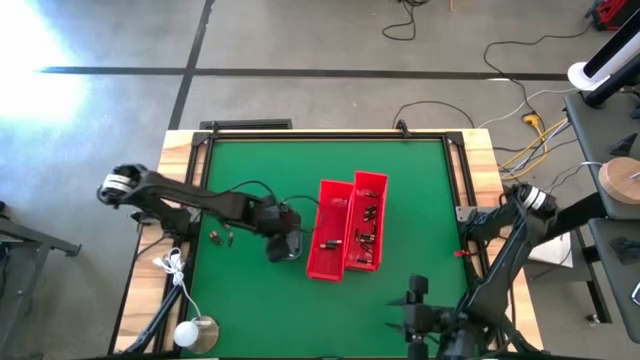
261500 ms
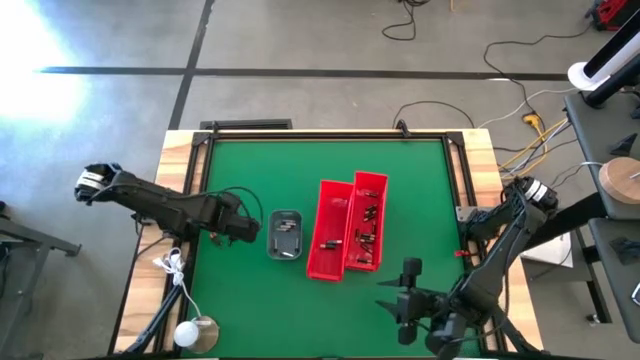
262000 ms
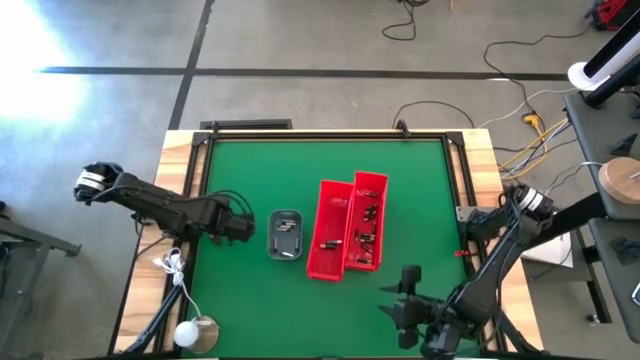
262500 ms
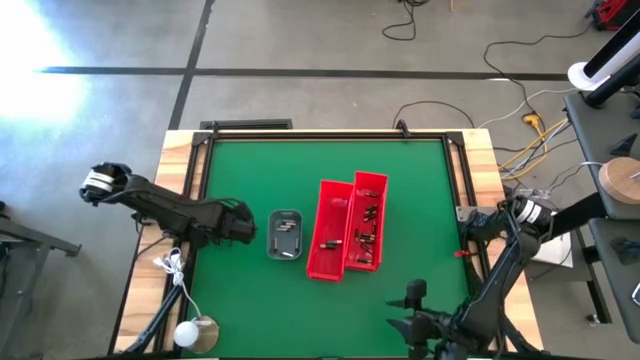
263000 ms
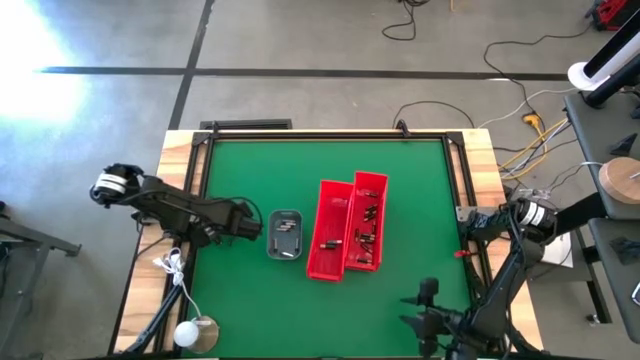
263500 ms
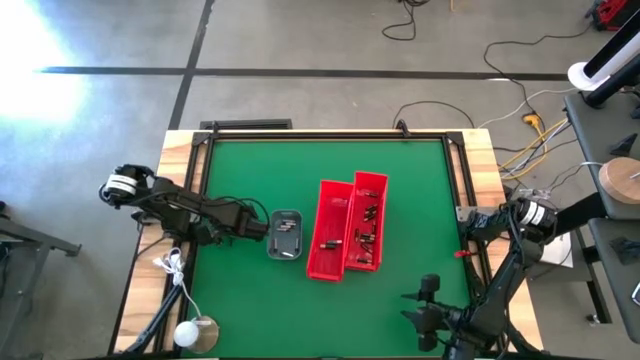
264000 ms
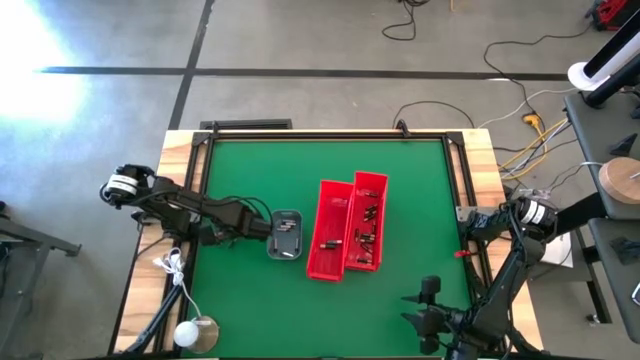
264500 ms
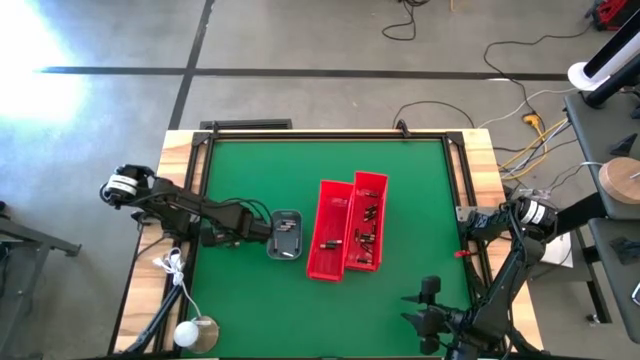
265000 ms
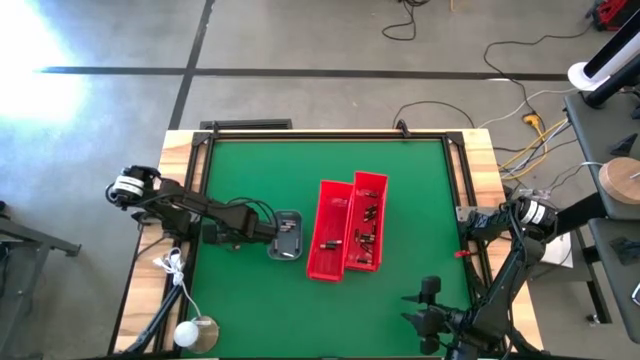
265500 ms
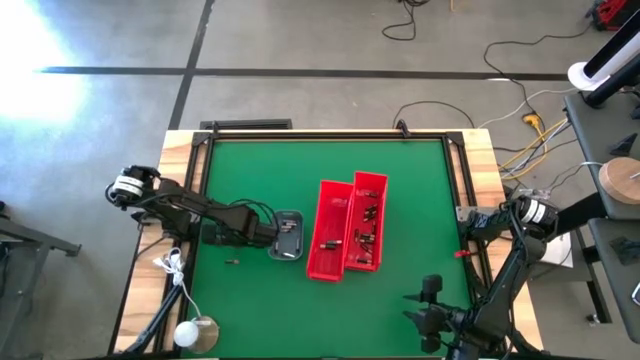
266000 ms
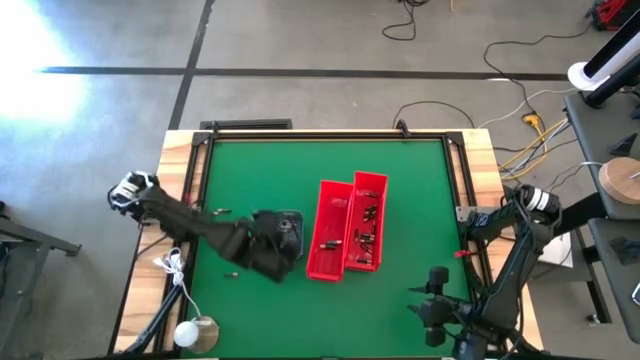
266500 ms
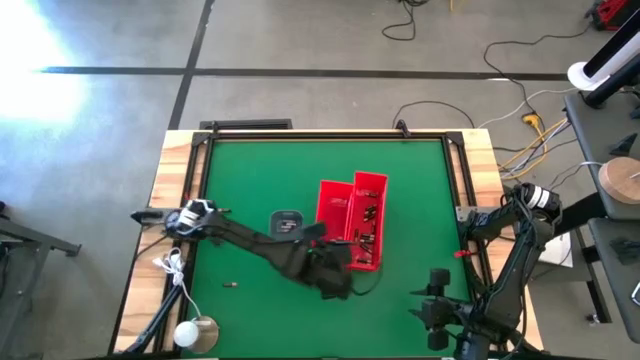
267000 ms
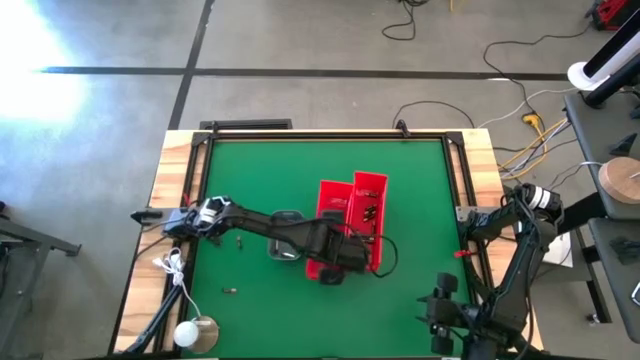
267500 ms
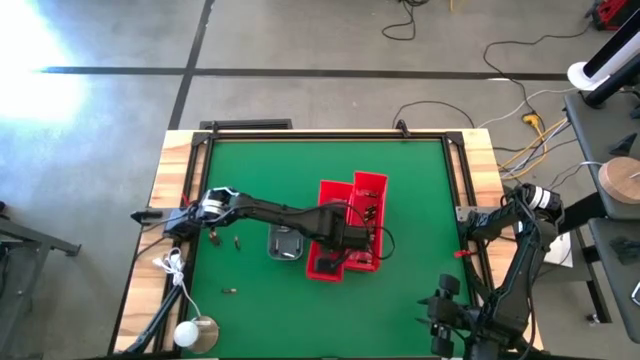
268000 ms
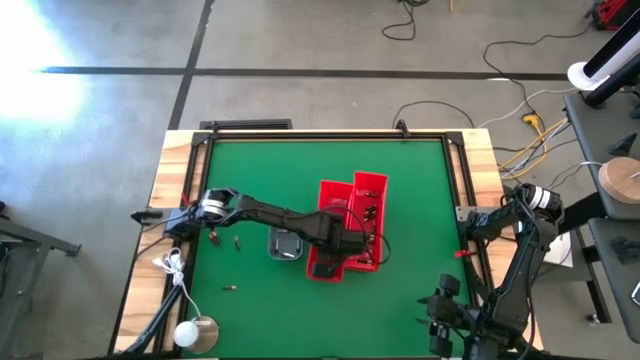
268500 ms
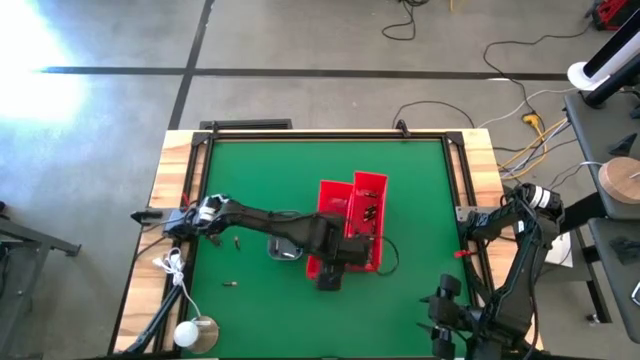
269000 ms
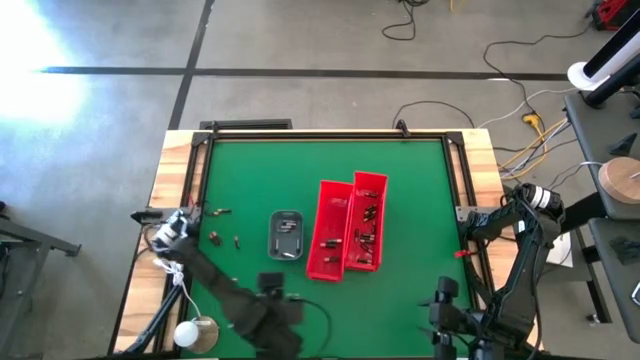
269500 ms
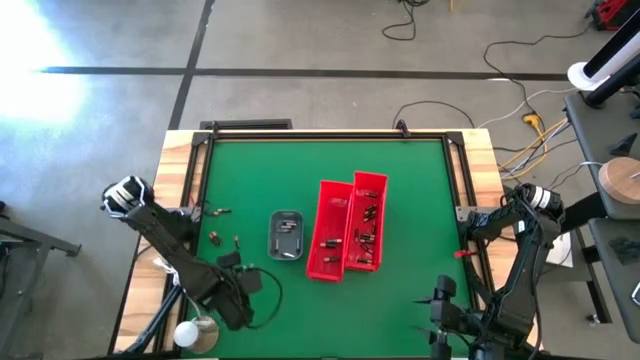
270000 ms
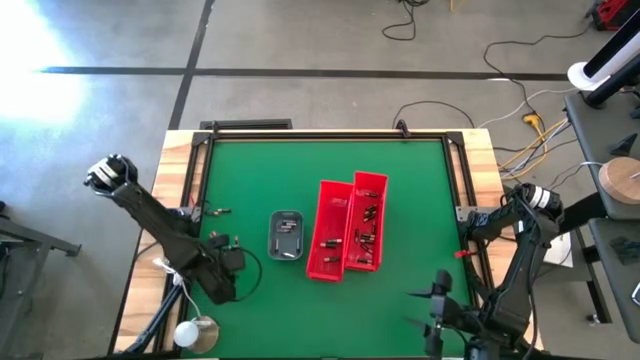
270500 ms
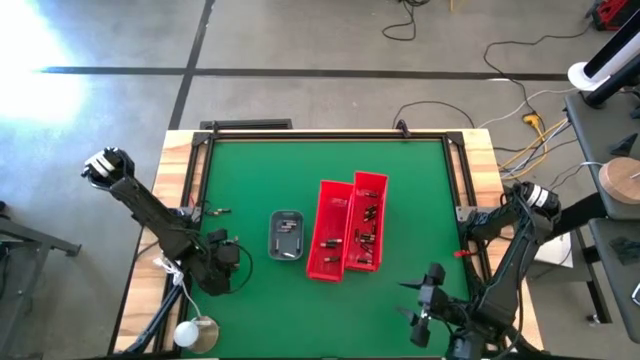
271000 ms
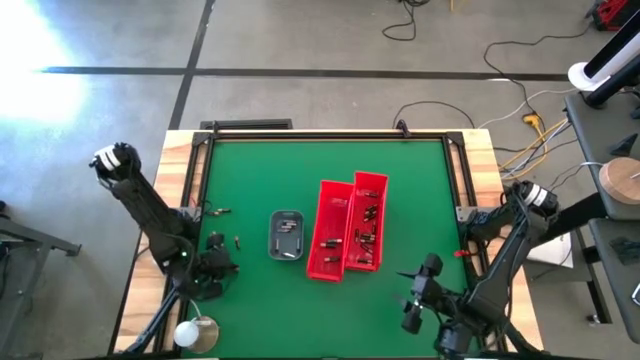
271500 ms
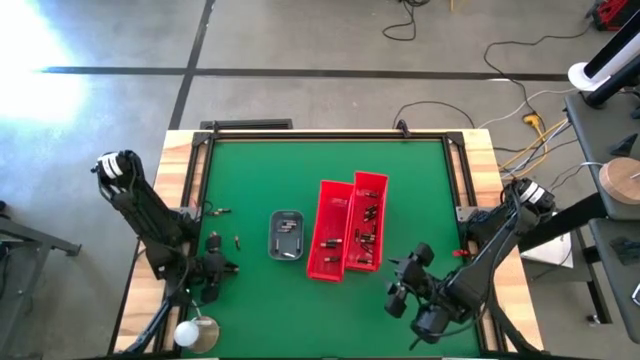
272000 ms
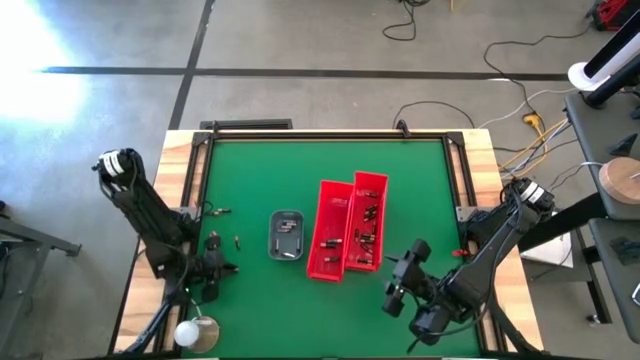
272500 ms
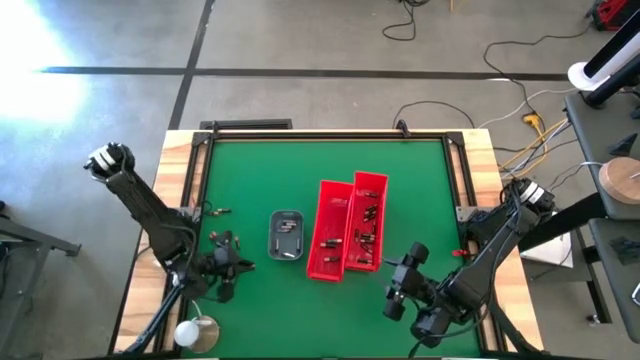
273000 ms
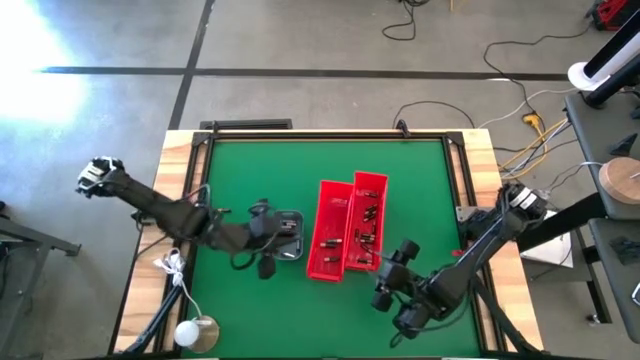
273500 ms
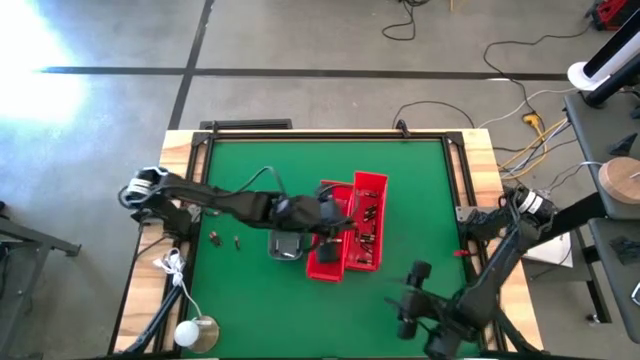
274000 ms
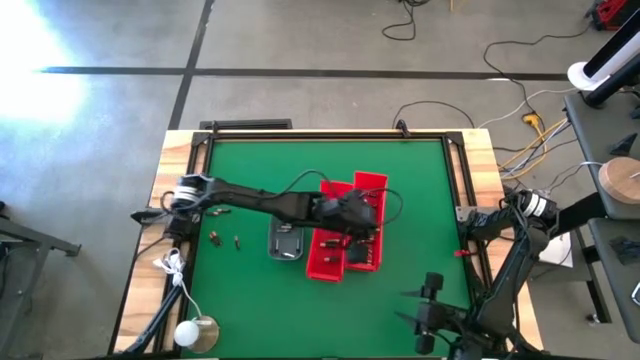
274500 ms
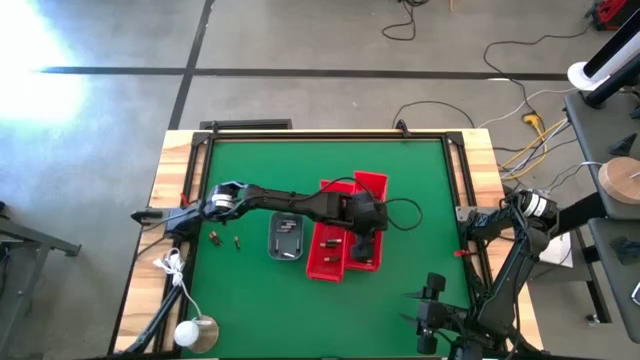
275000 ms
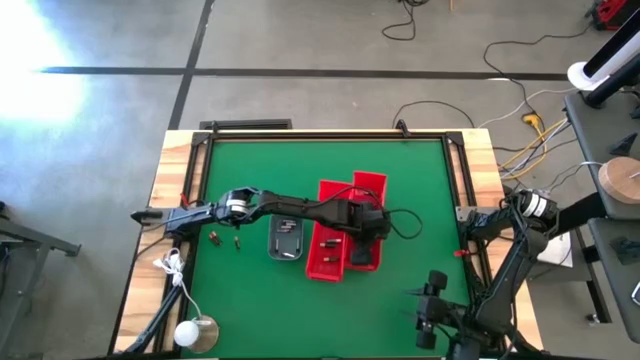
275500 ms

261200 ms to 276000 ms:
Task: Sort batteries
Put the big black battery into the left red bin

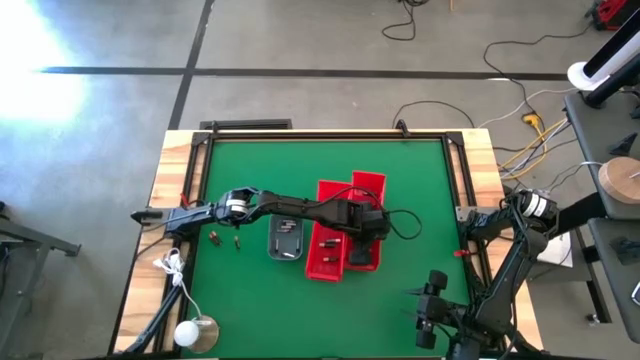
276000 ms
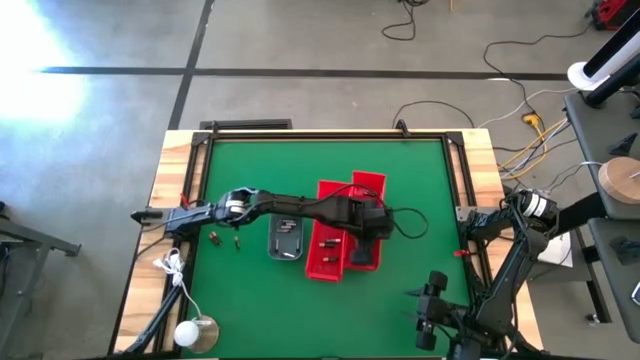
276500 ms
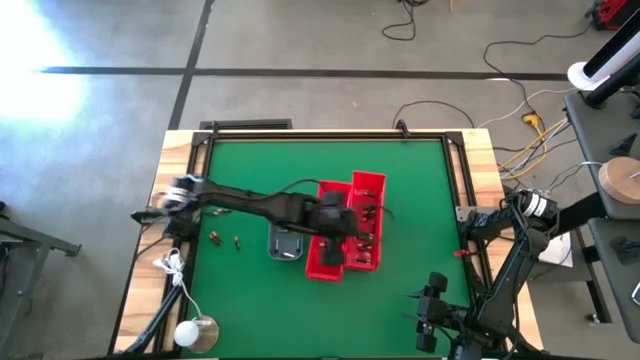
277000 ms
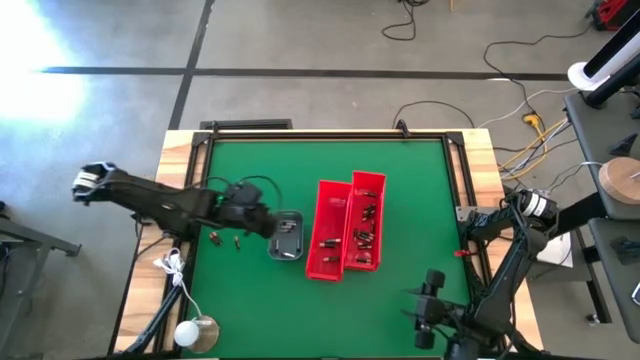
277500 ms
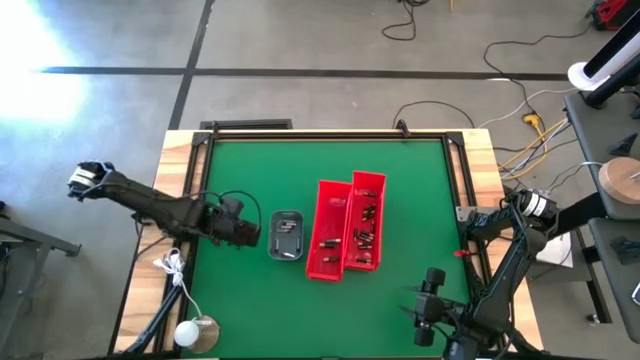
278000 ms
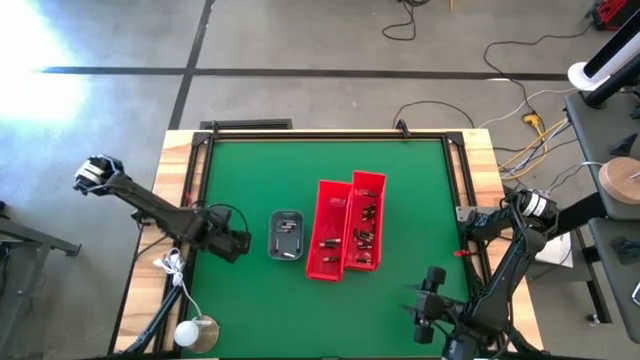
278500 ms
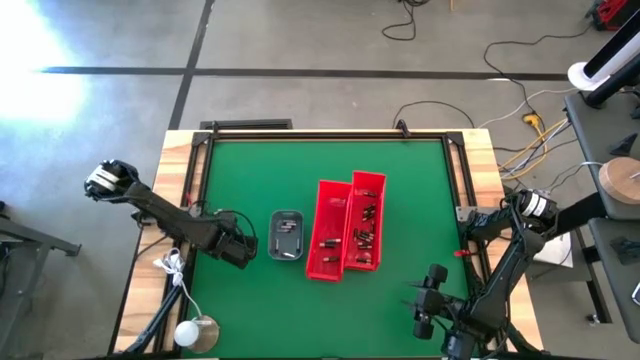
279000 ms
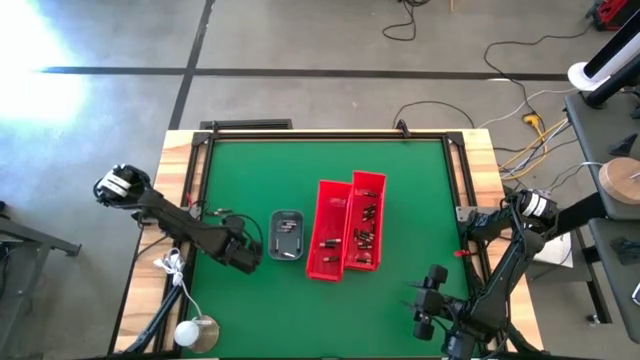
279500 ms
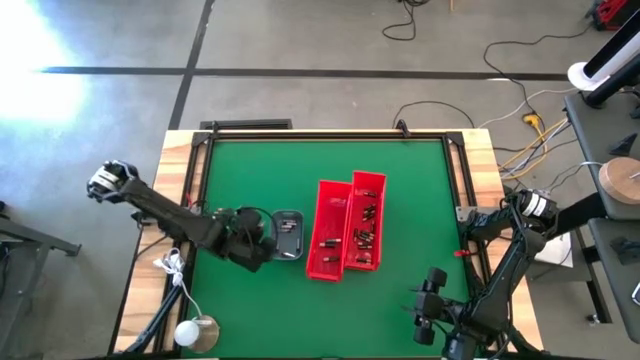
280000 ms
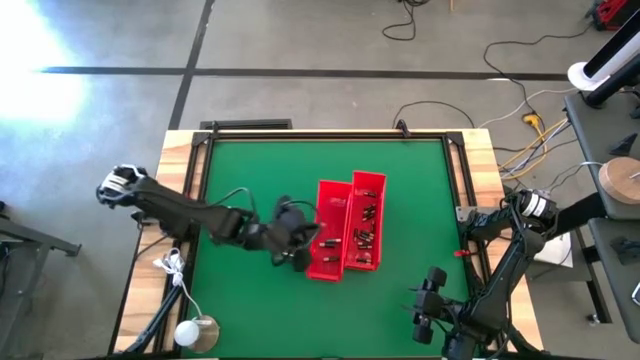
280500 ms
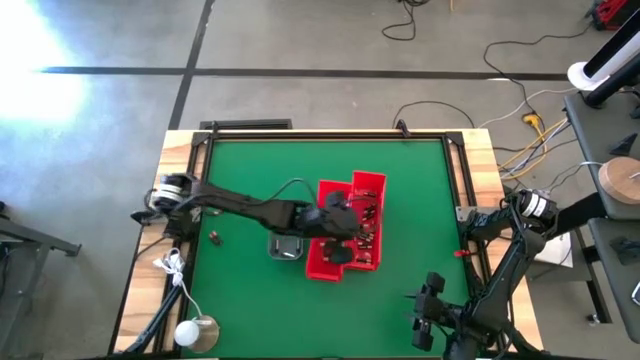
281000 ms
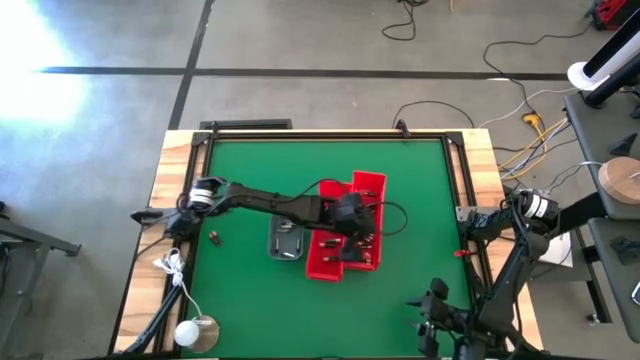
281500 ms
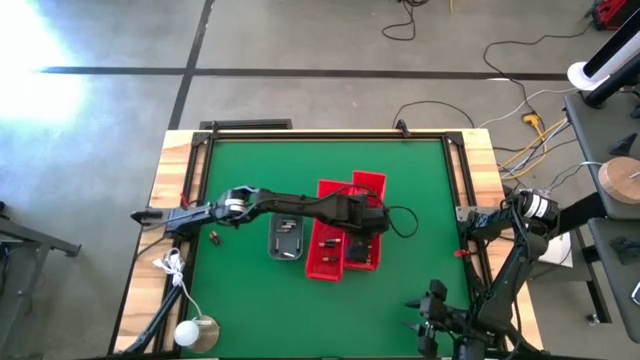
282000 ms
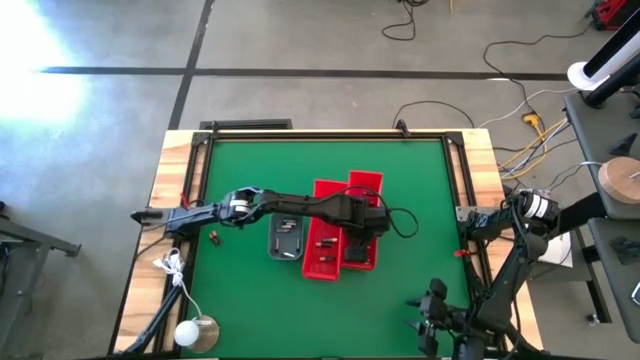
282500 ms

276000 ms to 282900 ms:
Put the small black battery into the right red bin
